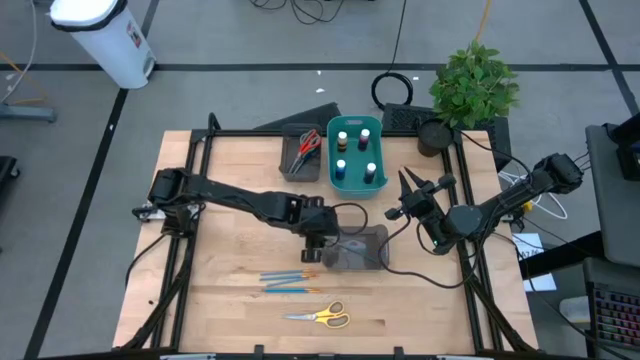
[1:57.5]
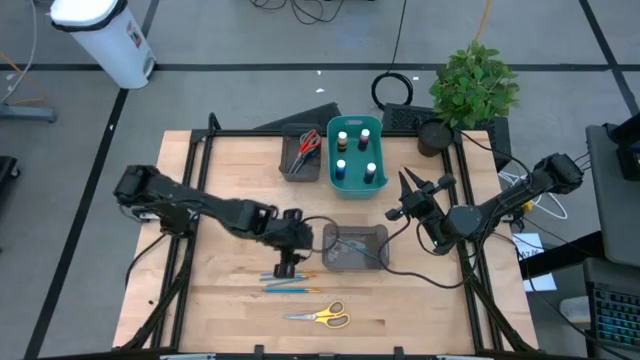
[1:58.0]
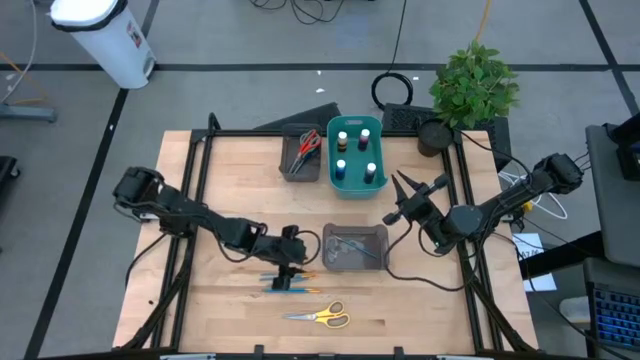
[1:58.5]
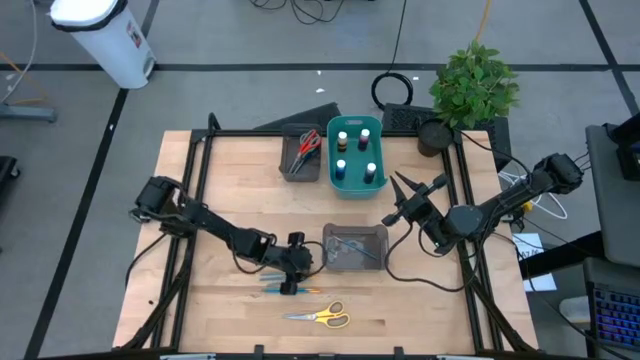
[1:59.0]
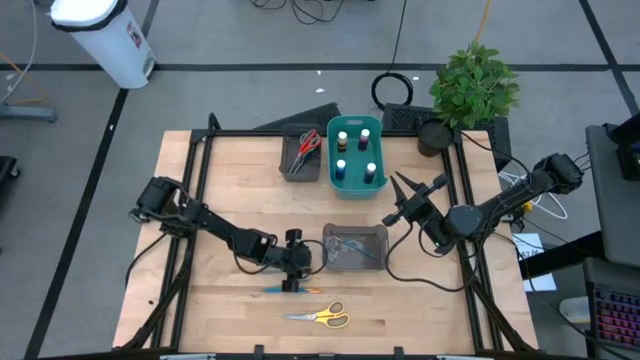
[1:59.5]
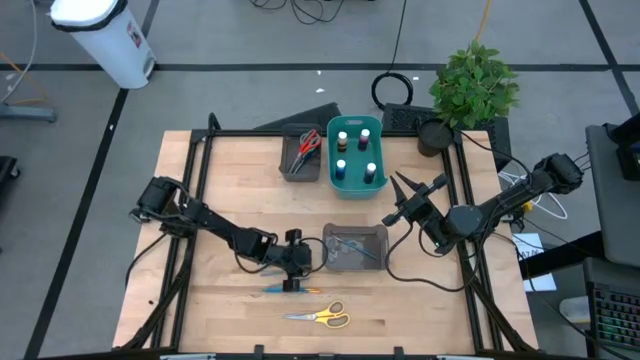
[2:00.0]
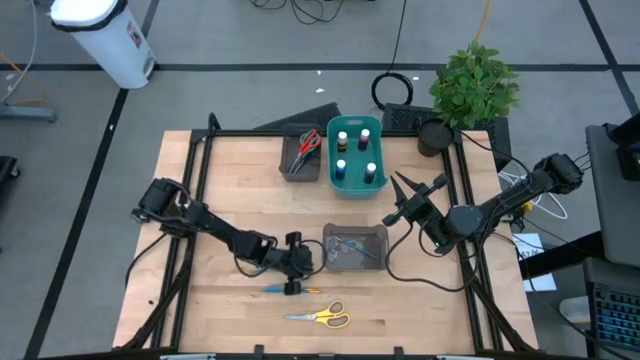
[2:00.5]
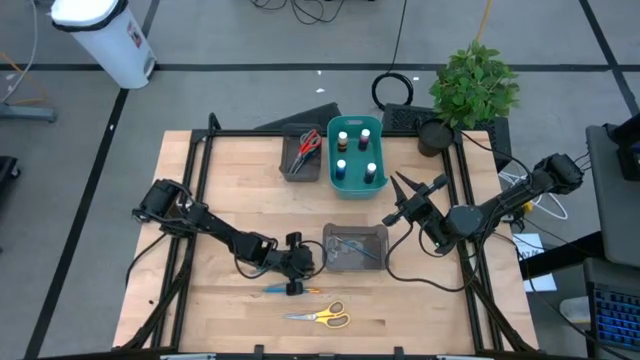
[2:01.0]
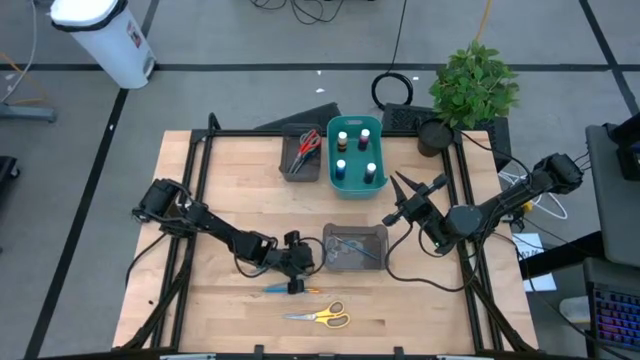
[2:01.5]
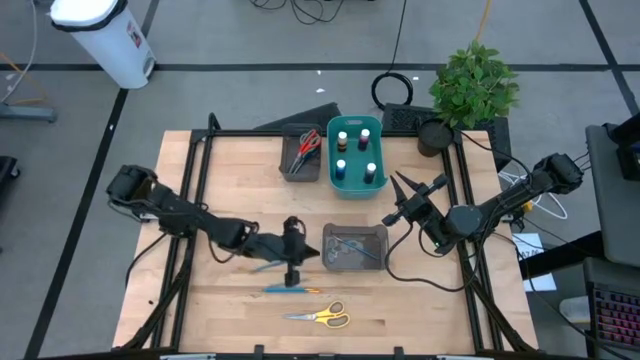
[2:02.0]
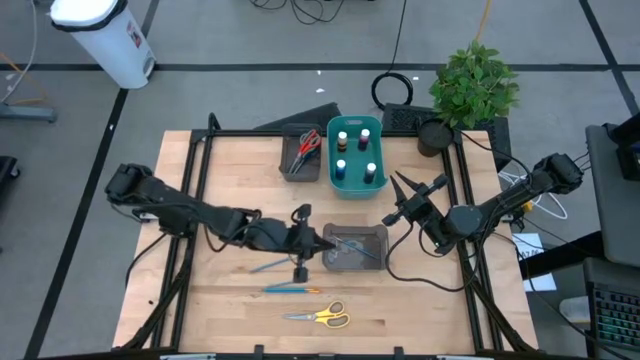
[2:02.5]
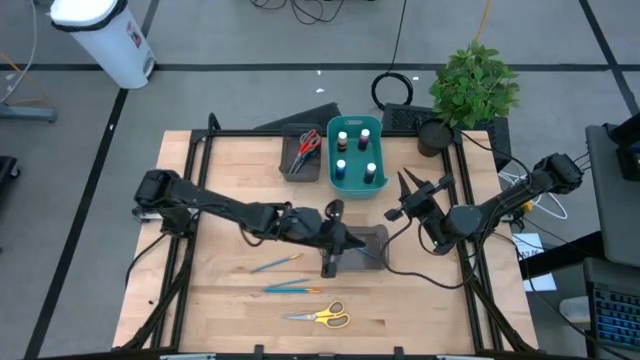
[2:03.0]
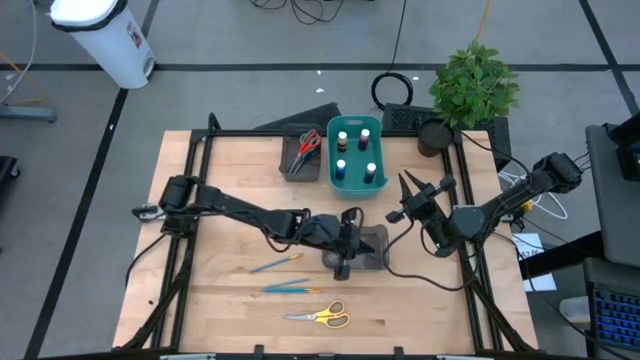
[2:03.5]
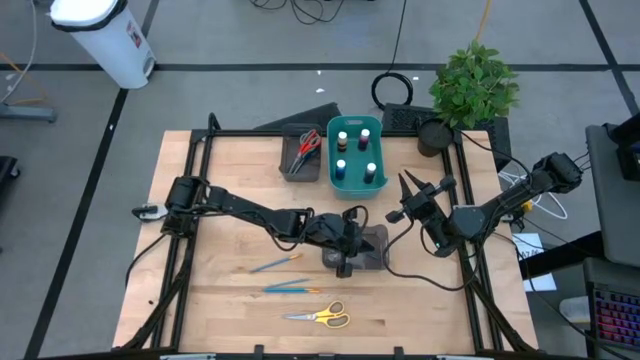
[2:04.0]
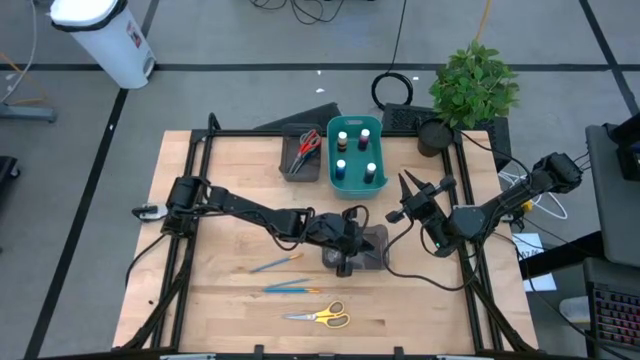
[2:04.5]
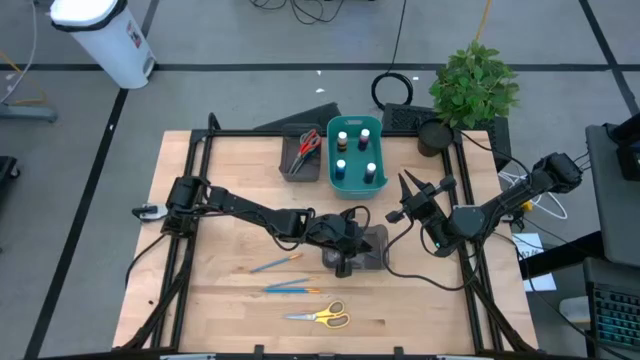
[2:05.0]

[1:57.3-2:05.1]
Task: Pick & Place Paint Supplies
Put the blue paint brush into the bottom black bin

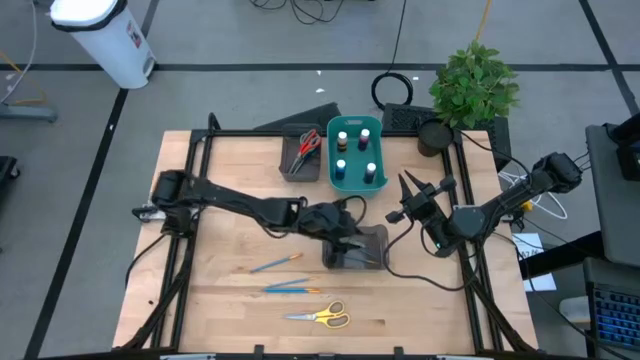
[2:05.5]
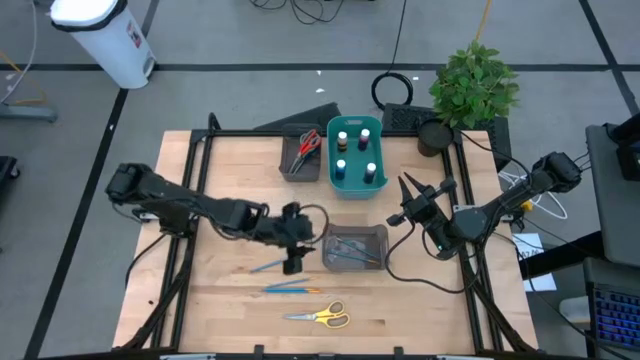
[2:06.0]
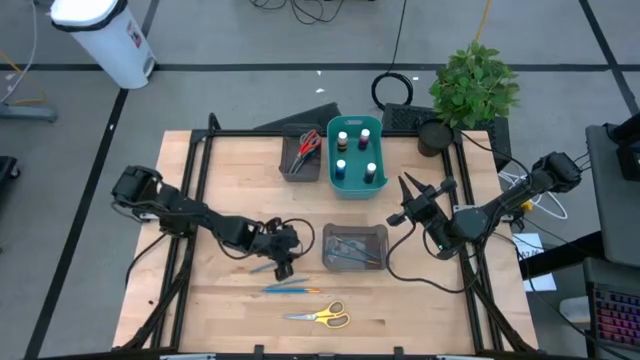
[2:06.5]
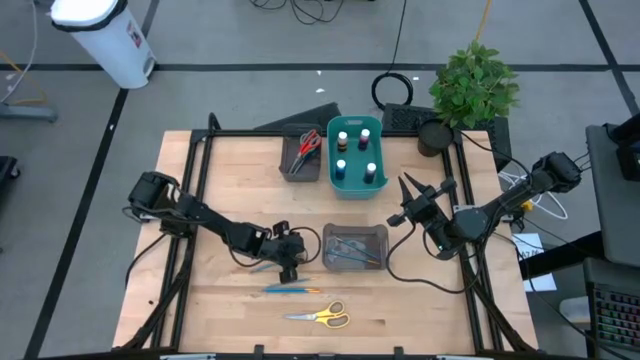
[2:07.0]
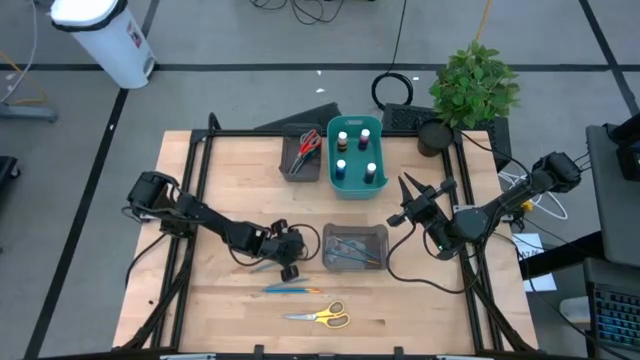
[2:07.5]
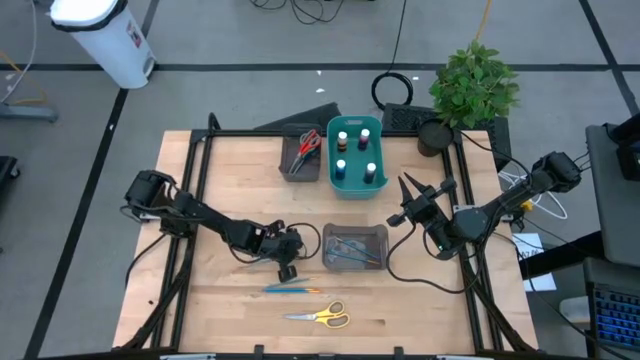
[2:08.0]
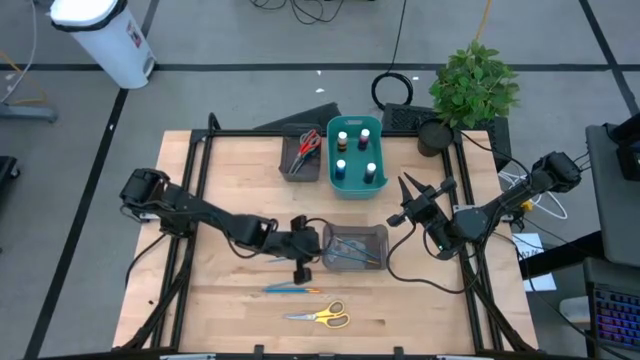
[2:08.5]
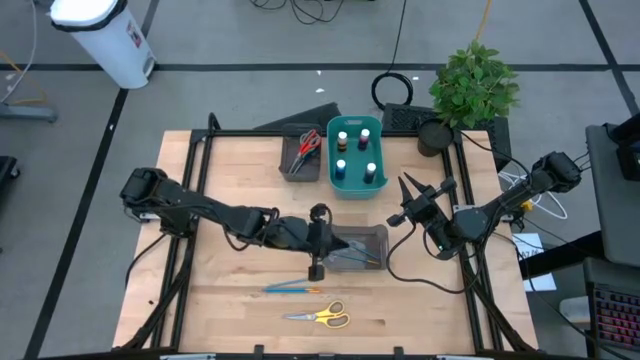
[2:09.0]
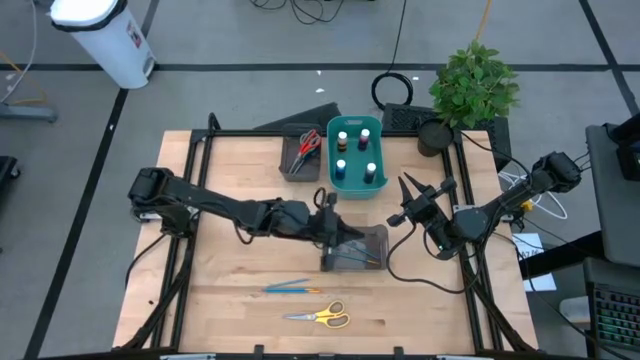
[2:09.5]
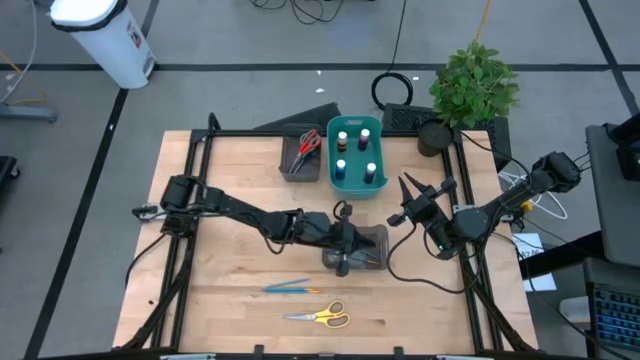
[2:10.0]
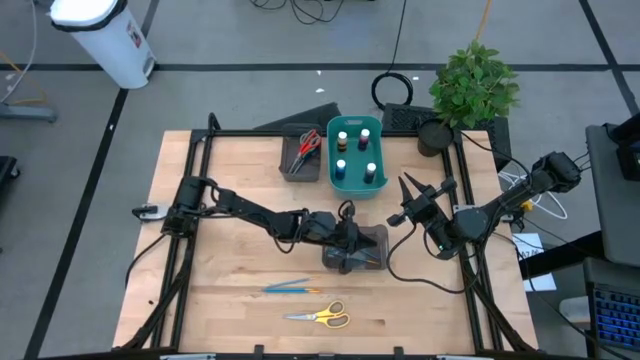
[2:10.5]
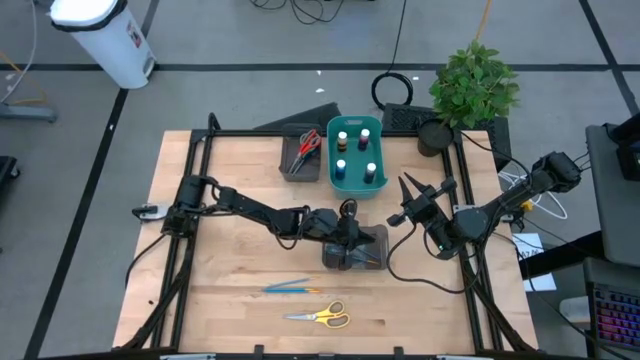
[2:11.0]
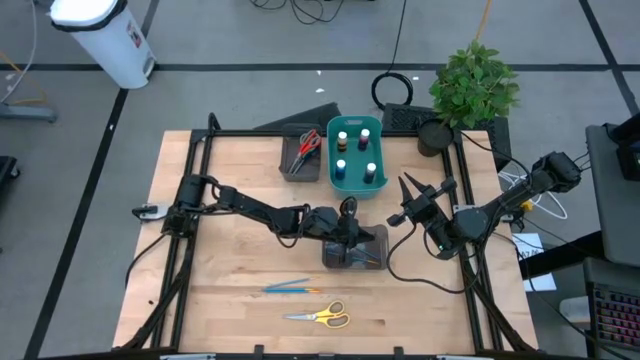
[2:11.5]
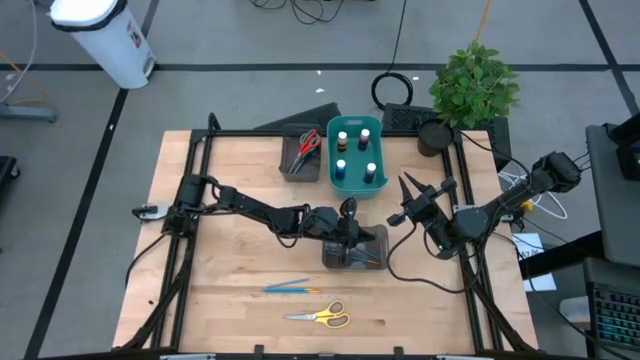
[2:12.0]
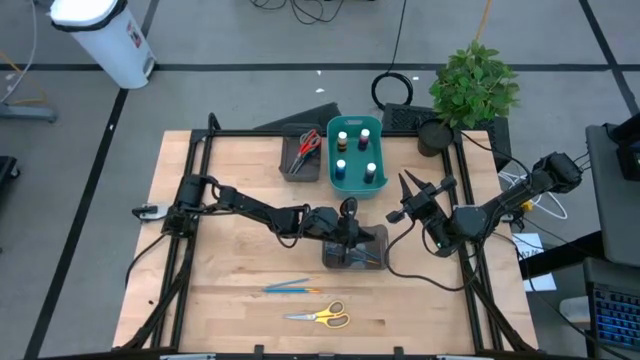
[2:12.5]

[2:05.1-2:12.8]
Put the blue paint brush into the bottom black bin

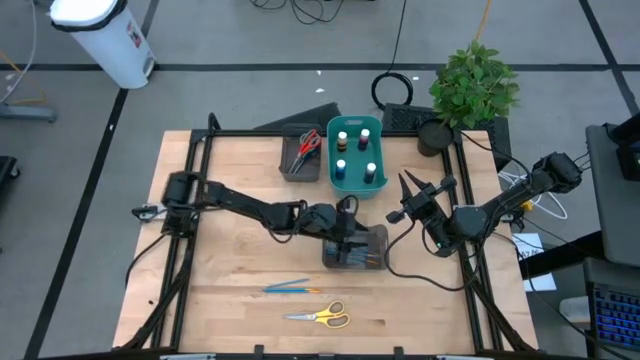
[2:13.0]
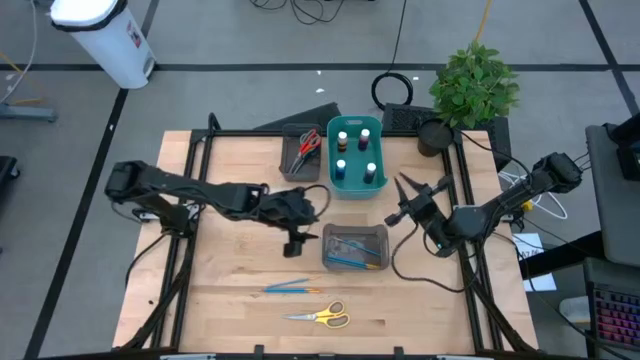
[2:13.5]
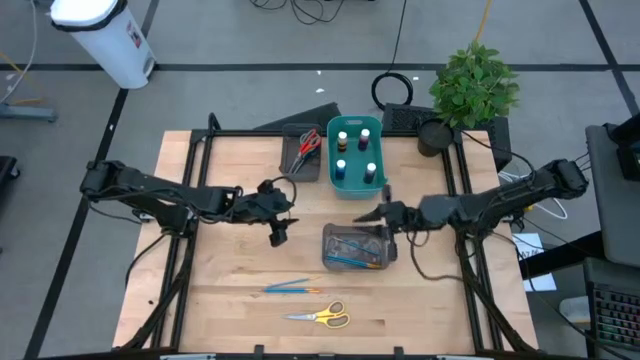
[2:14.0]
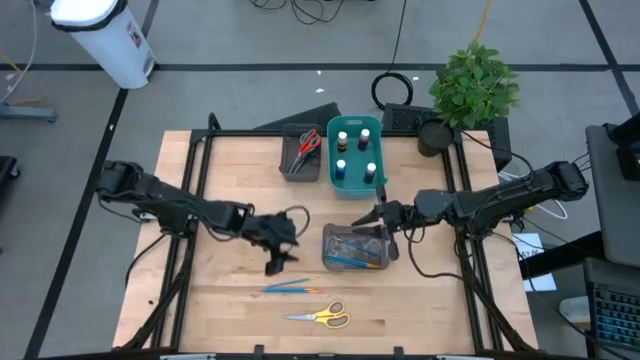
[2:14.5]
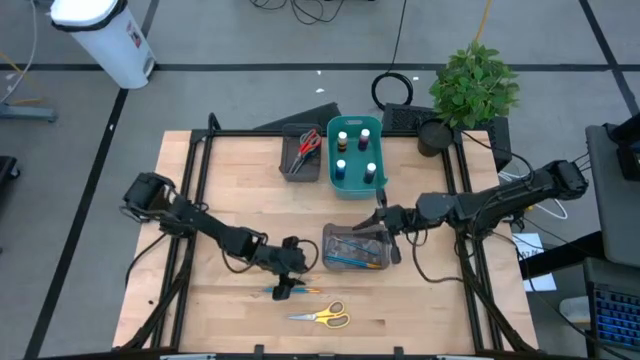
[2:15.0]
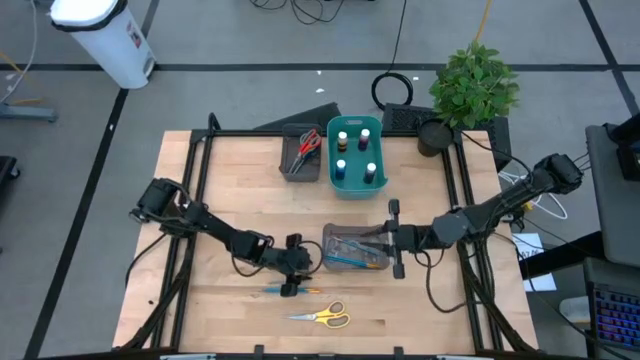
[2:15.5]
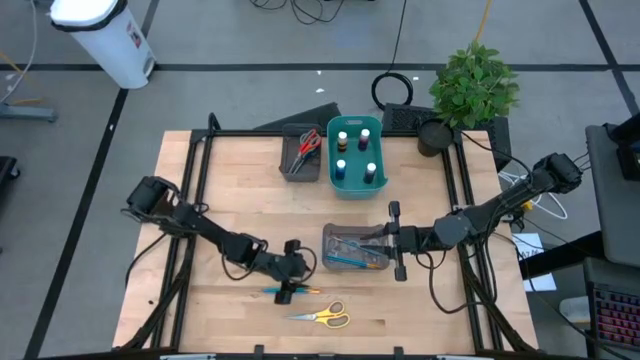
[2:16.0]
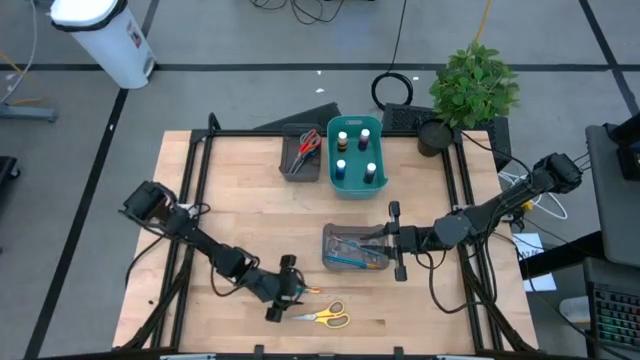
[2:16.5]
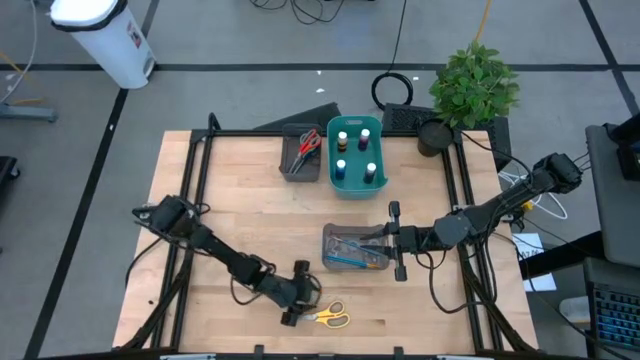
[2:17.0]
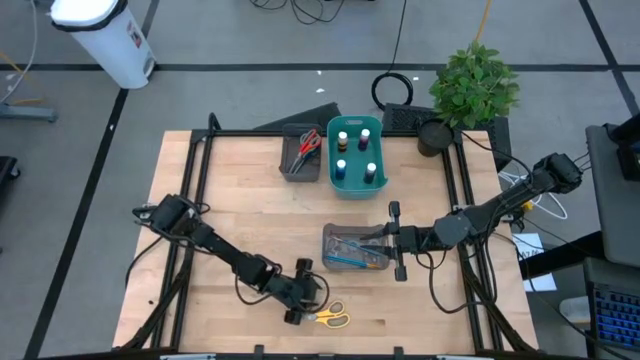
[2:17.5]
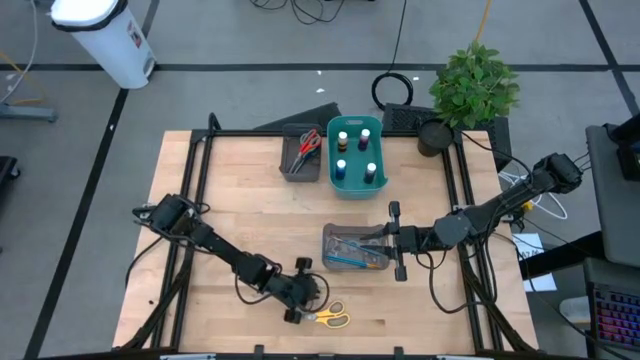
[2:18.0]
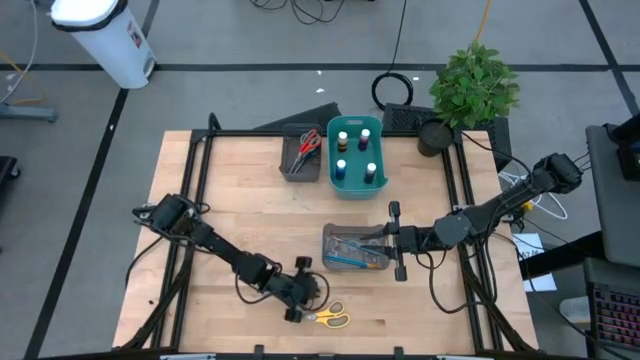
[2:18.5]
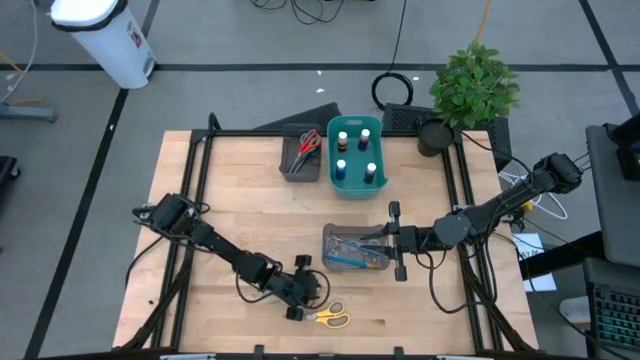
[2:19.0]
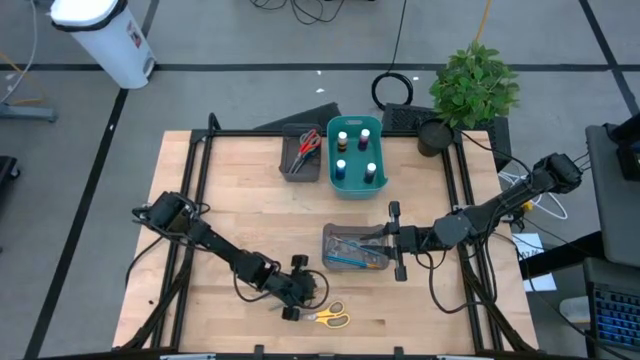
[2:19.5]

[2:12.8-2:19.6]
Put the blue paint brush into the bottom black bin
